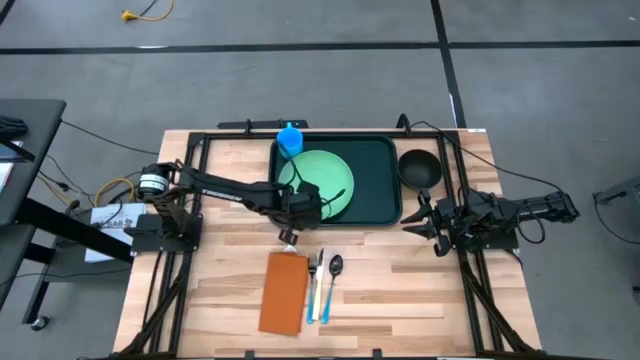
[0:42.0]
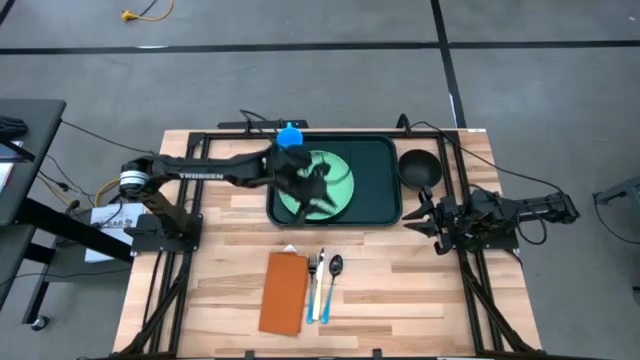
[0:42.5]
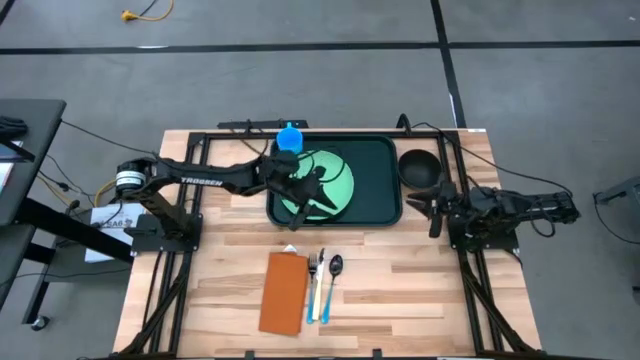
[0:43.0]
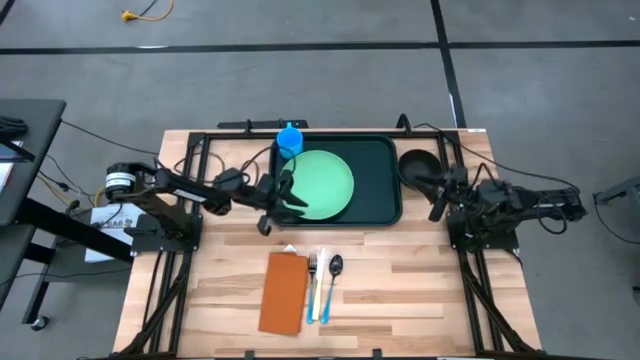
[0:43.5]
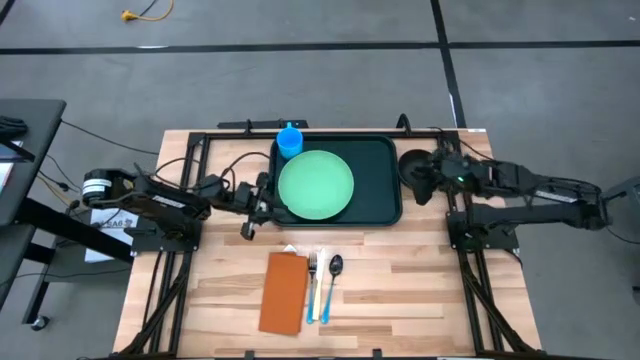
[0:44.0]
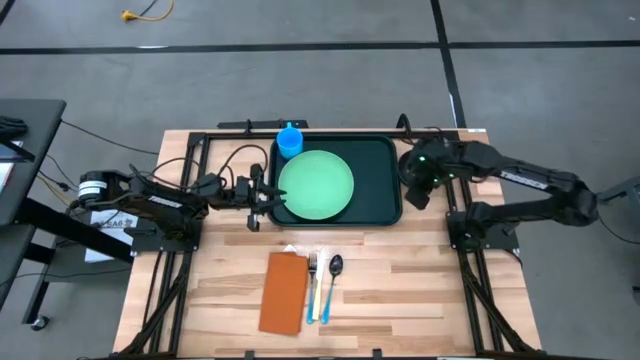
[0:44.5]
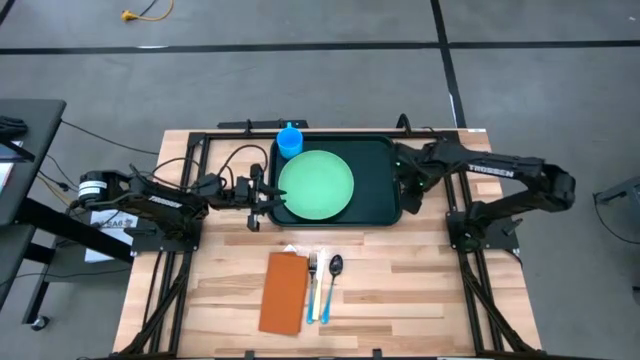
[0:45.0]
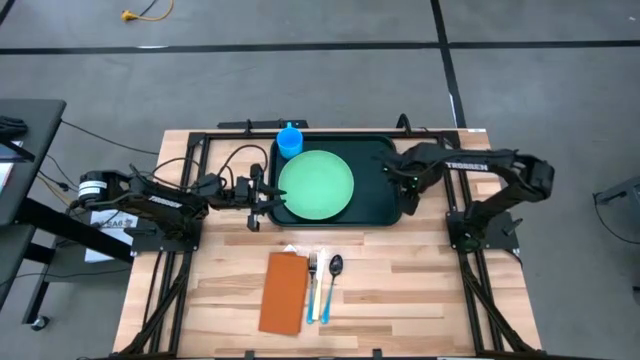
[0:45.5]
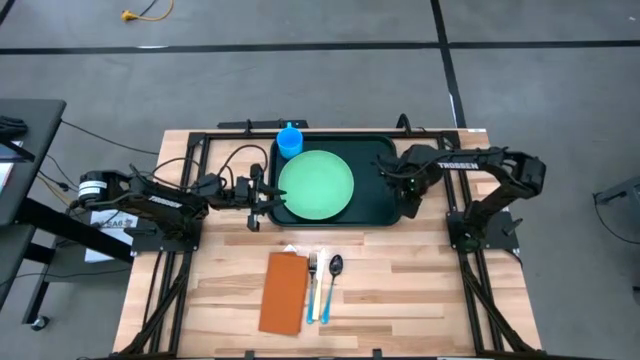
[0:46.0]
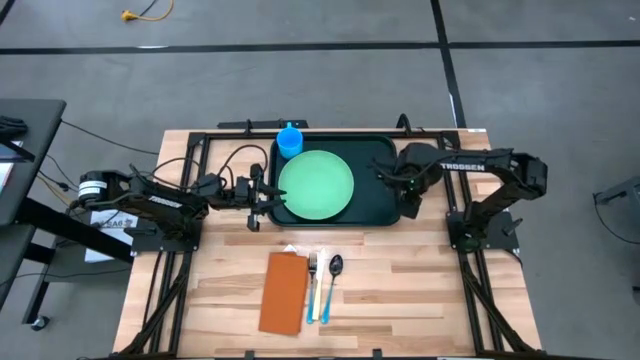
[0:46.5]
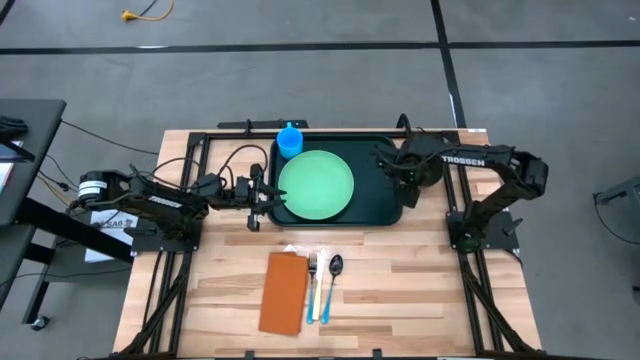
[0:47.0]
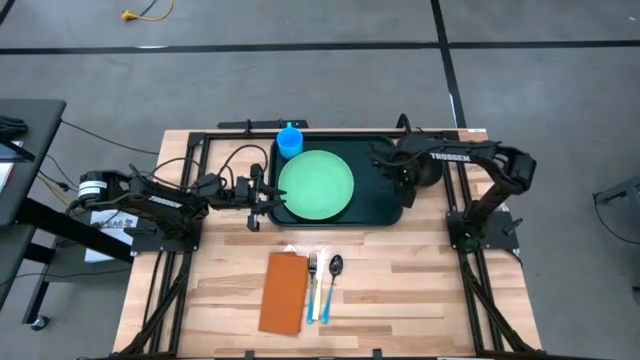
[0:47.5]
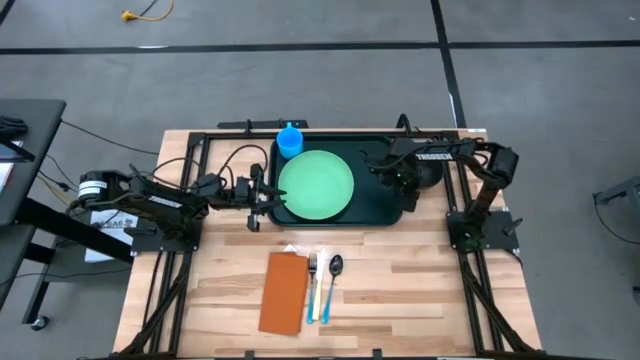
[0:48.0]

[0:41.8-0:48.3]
Task: Set up tray
Stack the black bowl on top of the light green plate on the black serving tray

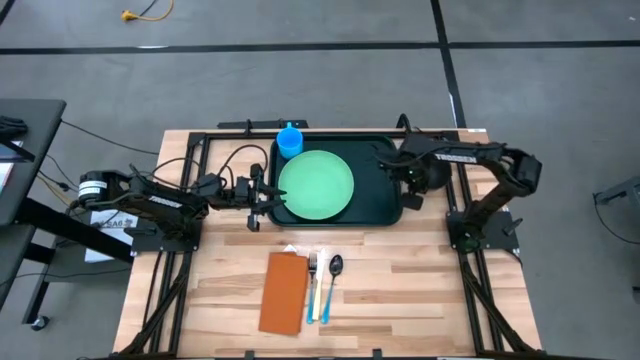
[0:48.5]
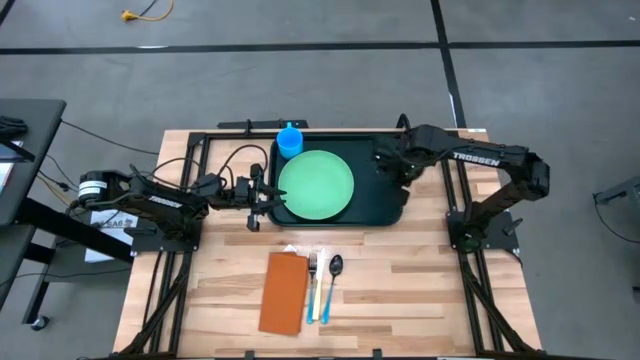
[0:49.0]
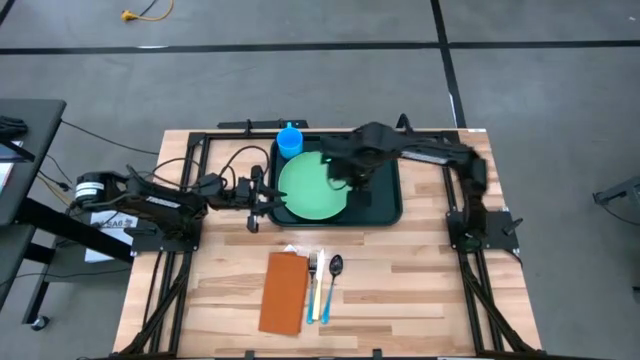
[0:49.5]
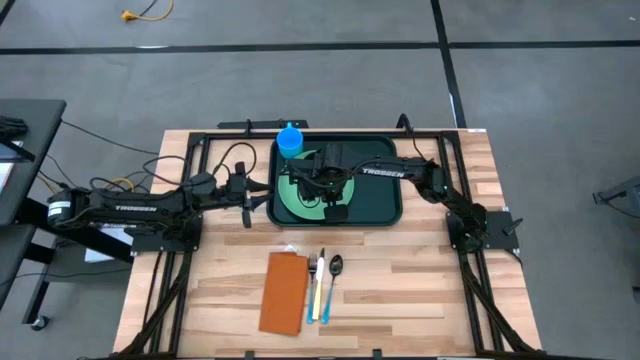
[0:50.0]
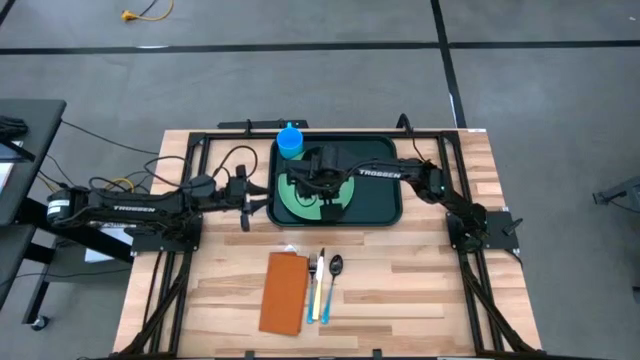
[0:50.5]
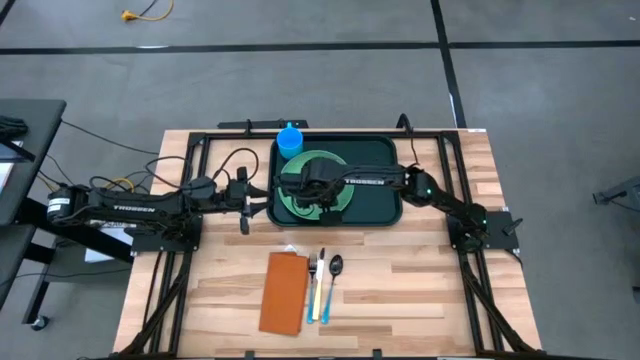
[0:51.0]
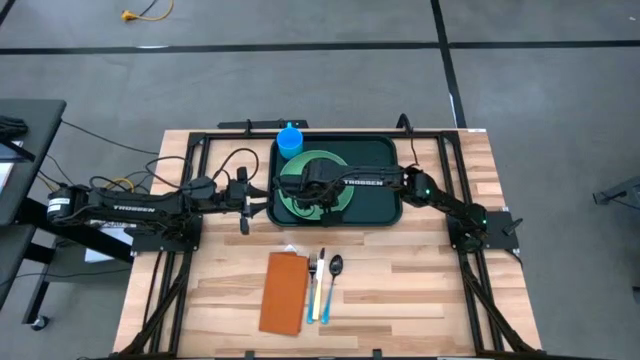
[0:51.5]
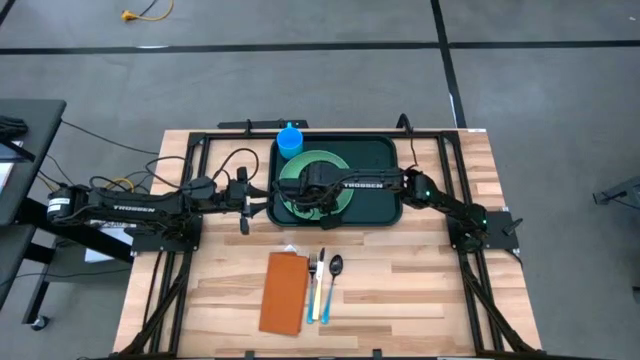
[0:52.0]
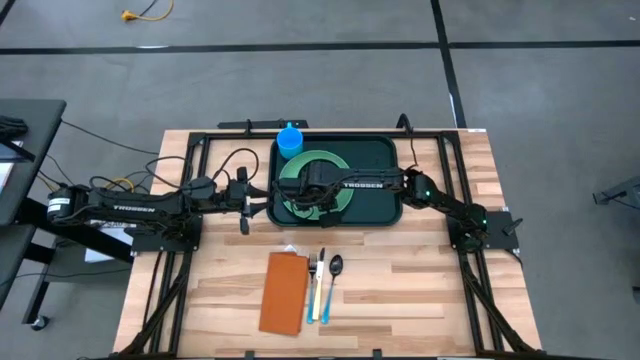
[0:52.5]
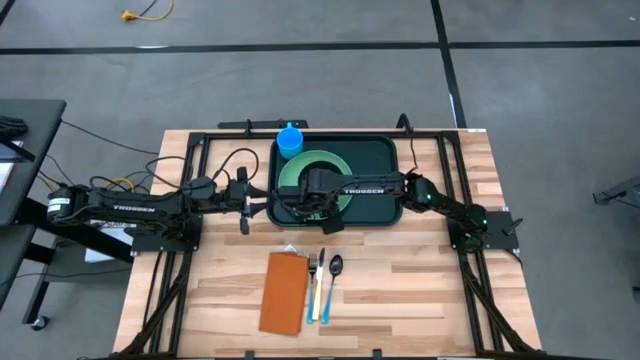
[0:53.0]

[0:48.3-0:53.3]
Stack the black bowl on top of the light green plate on the black serving tray

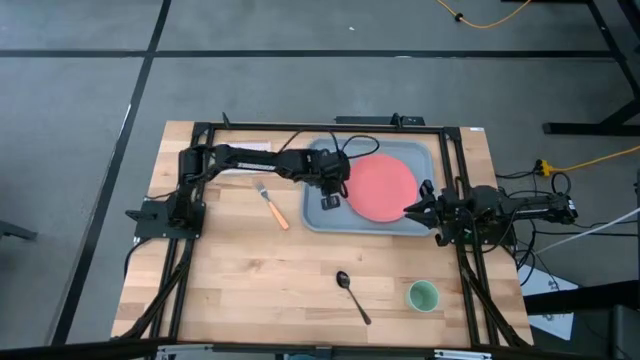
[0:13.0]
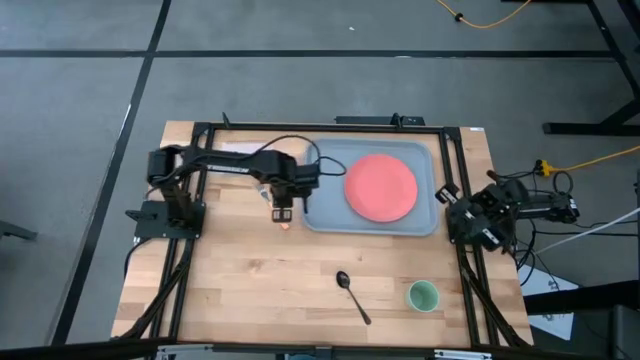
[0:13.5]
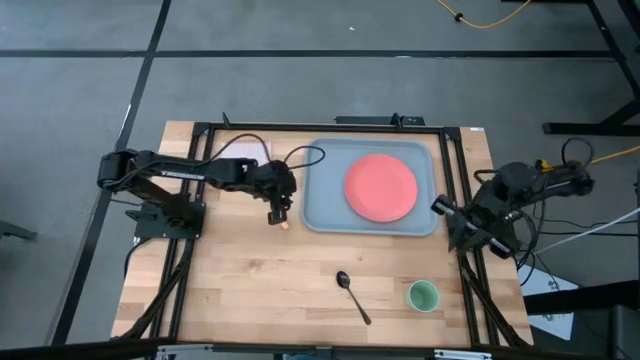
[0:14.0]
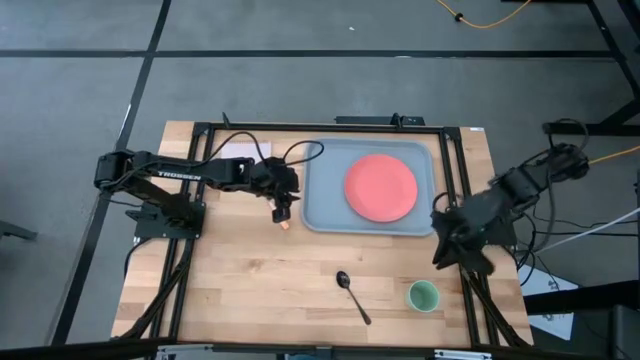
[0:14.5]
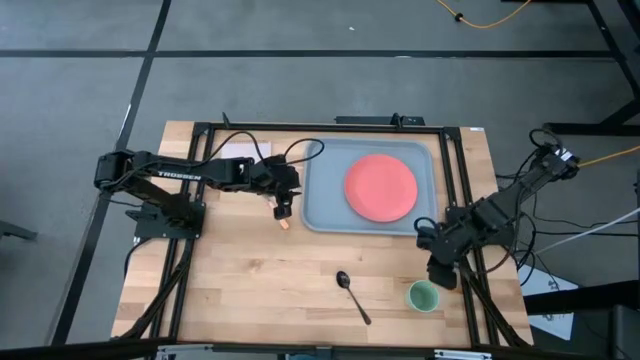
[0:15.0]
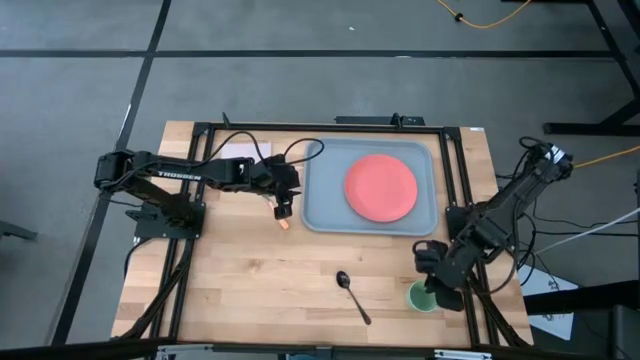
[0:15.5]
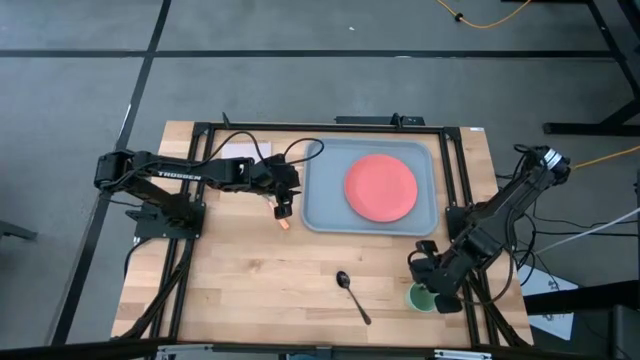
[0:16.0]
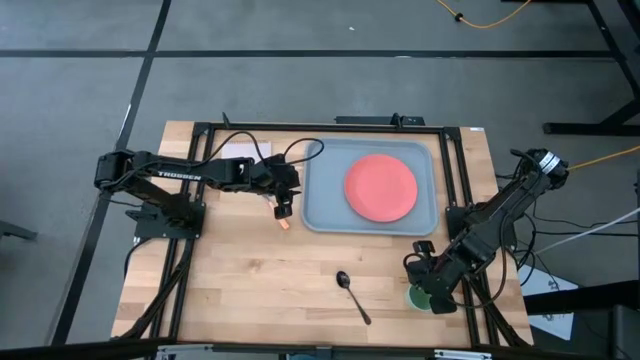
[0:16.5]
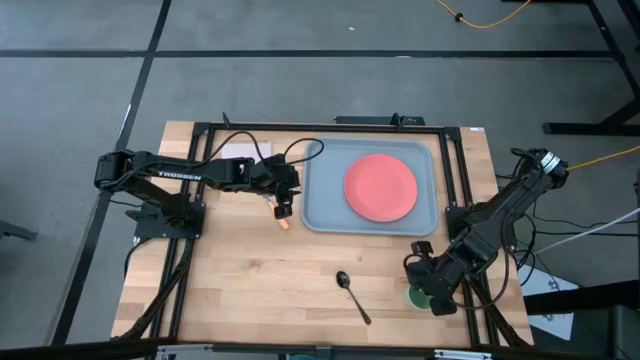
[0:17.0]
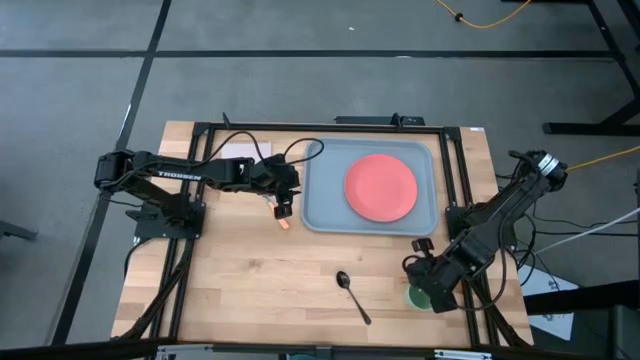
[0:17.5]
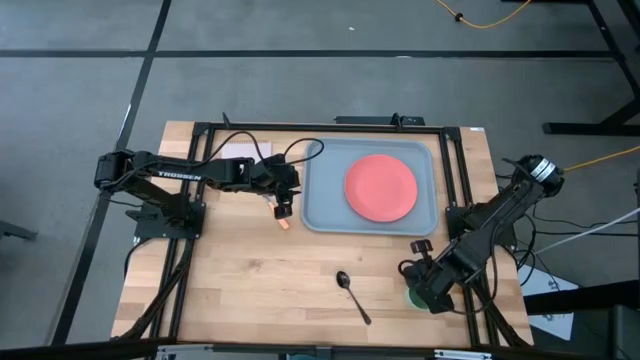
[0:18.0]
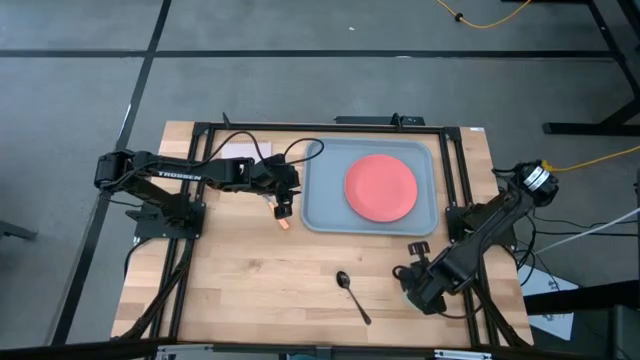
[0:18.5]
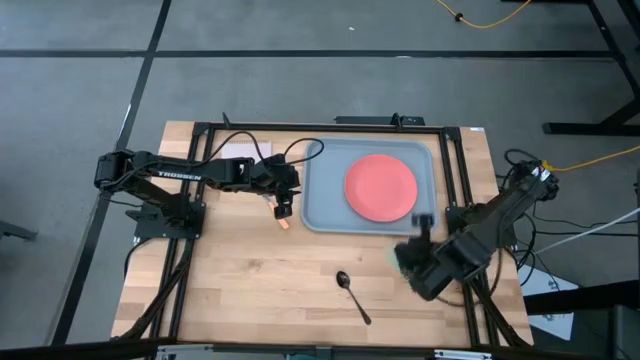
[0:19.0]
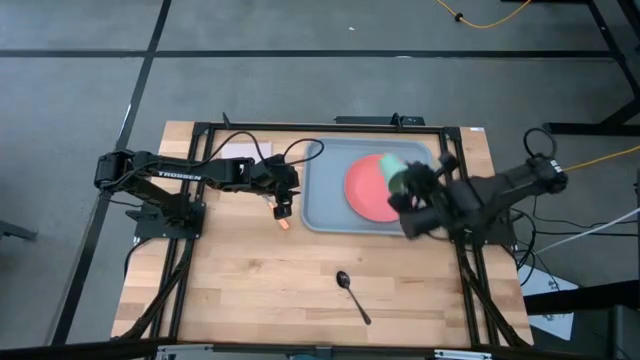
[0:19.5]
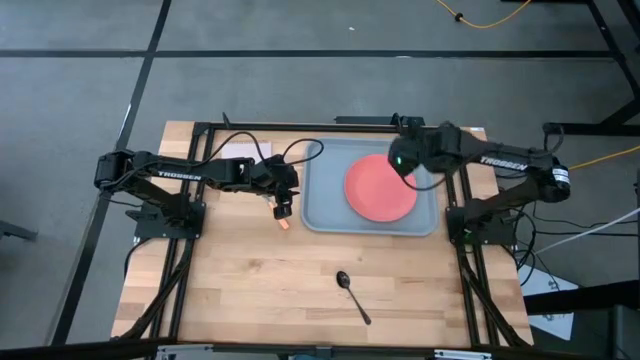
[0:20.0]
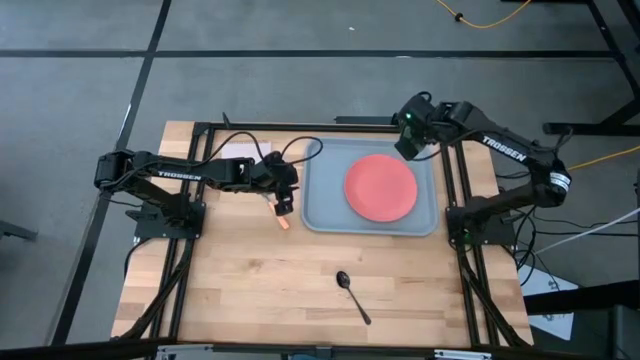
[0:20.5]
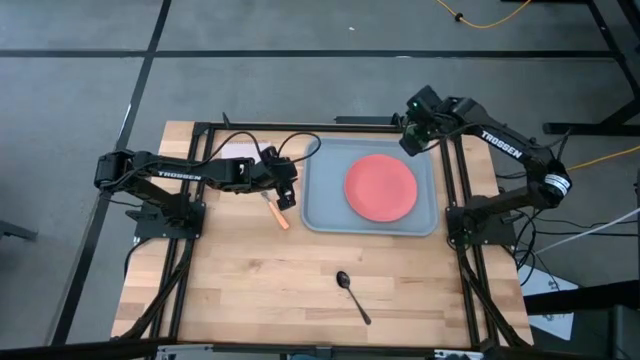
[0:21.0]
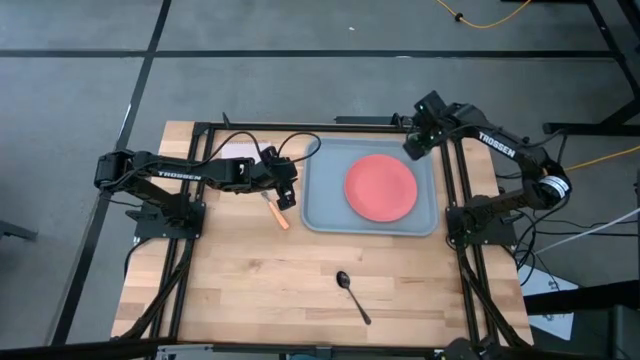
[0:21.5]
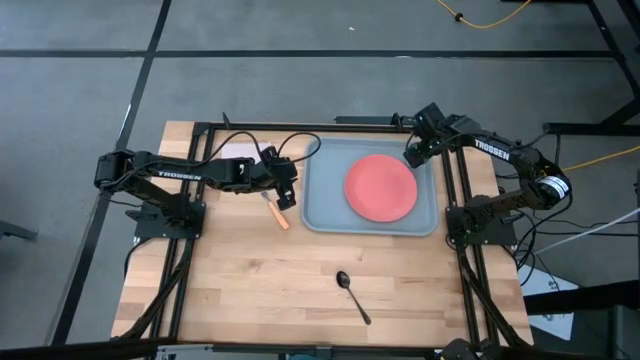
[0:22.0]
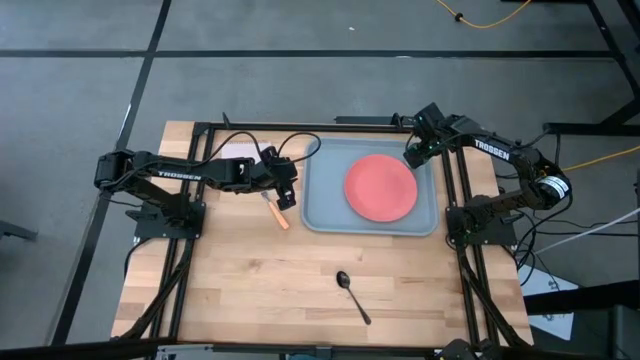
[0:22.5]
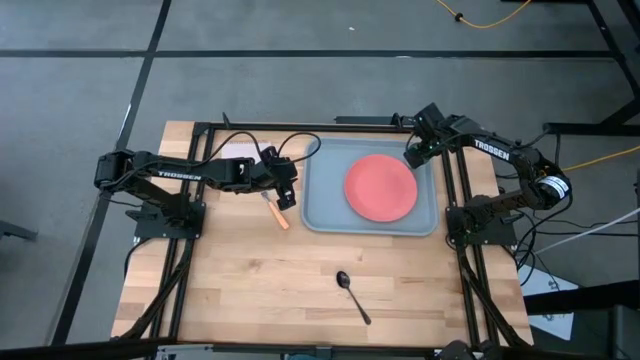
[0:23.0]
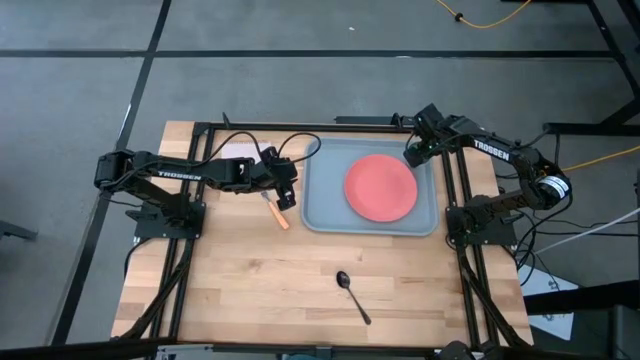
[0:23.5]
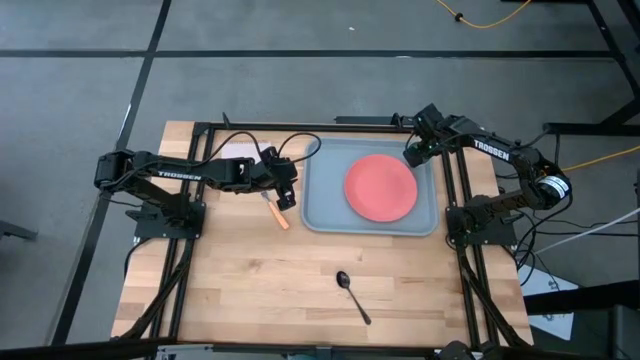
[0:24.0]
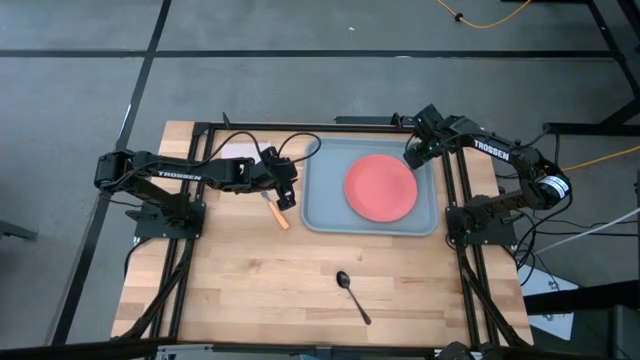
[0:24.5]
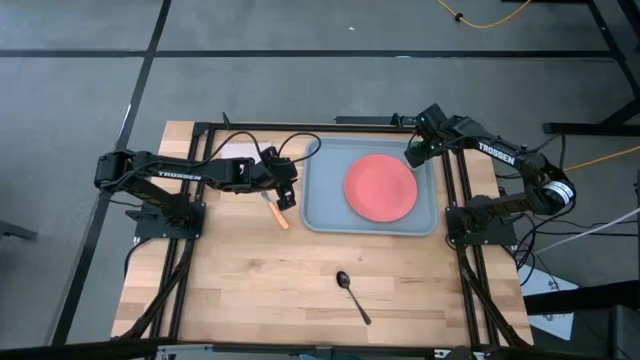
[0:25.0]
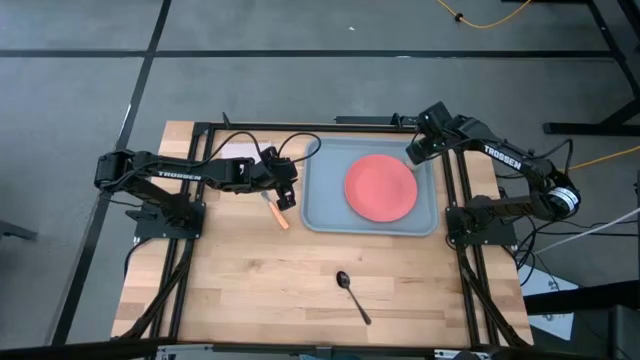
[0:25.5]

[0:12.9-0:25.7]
Task: Pick and place plate/cup/fork/spoon on tray
Put the green cup beside the pink plate on the gray serving tray
